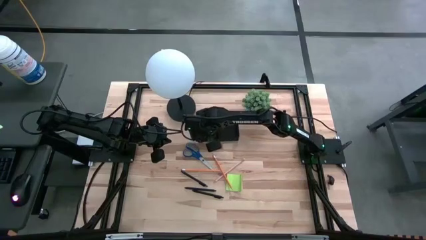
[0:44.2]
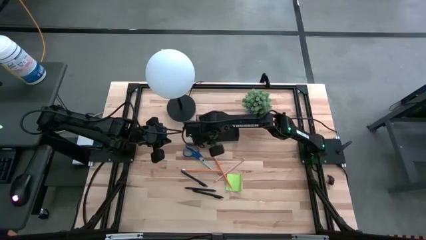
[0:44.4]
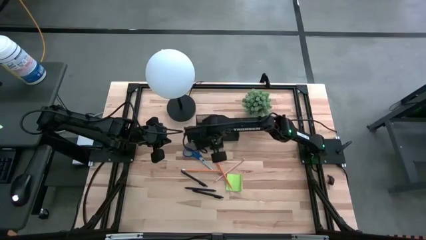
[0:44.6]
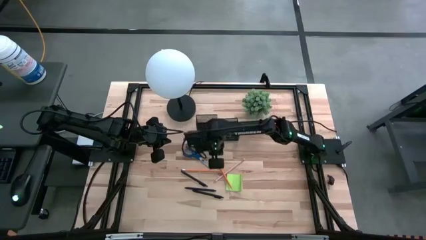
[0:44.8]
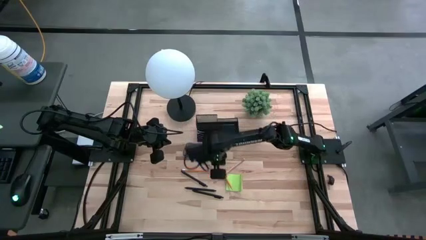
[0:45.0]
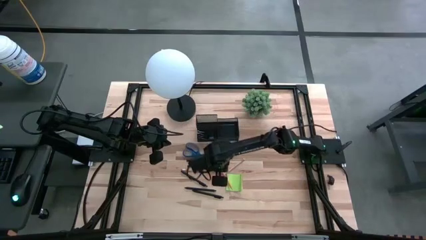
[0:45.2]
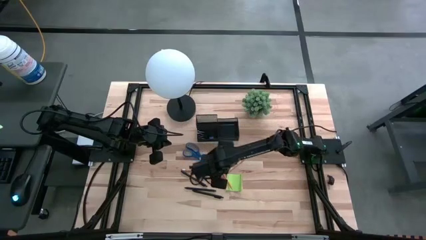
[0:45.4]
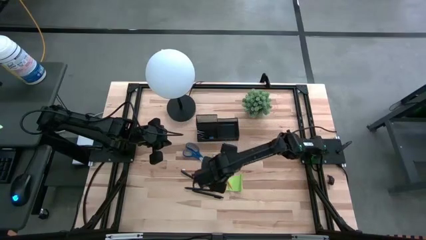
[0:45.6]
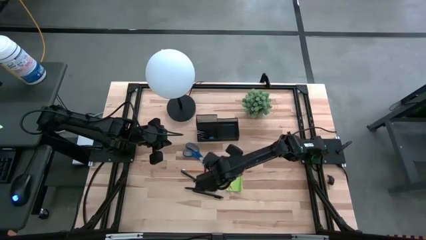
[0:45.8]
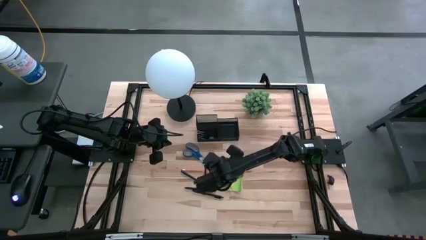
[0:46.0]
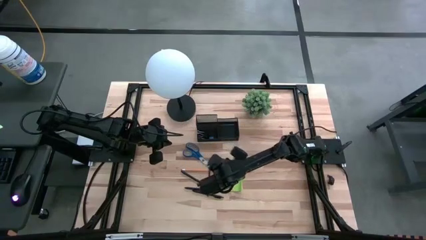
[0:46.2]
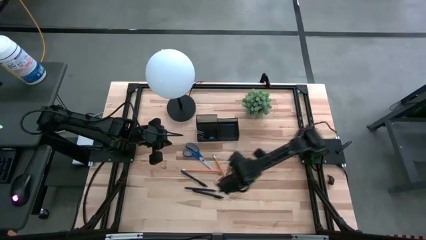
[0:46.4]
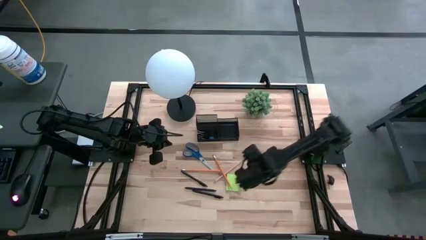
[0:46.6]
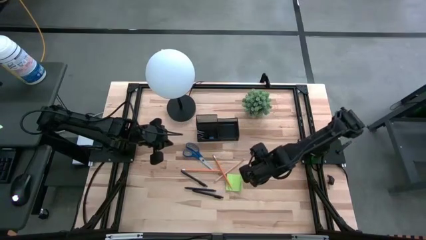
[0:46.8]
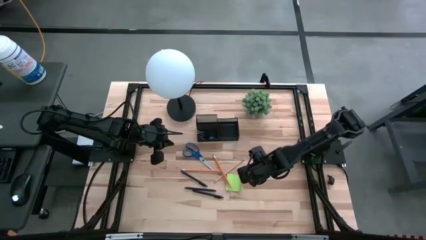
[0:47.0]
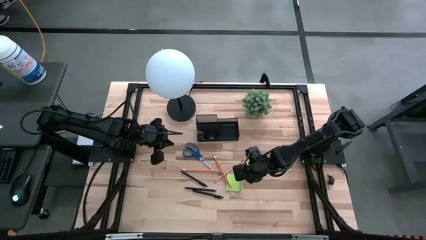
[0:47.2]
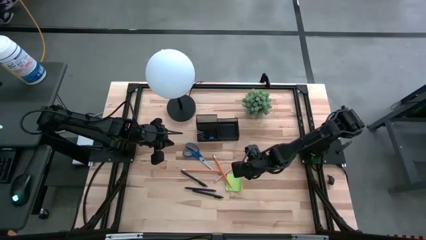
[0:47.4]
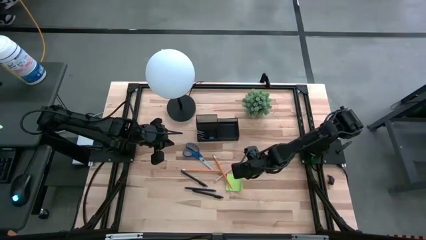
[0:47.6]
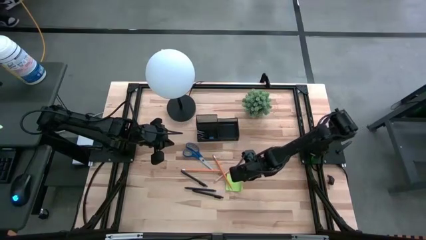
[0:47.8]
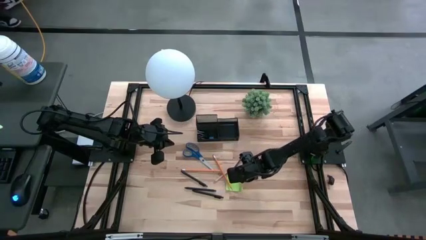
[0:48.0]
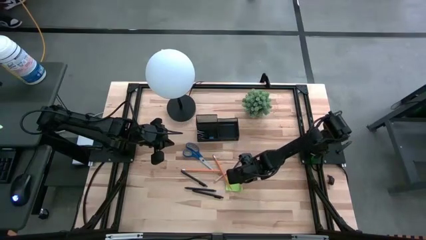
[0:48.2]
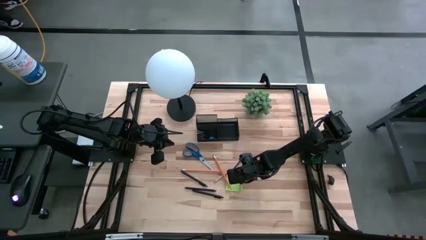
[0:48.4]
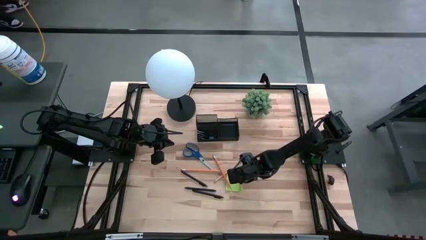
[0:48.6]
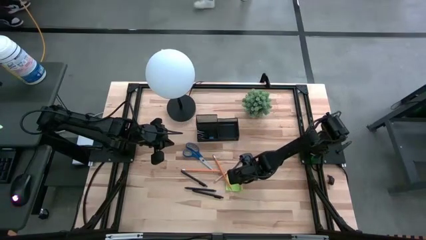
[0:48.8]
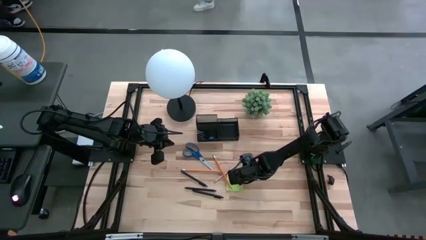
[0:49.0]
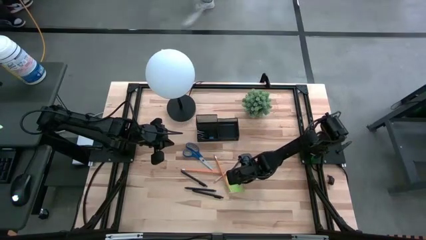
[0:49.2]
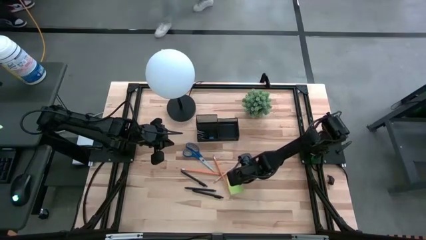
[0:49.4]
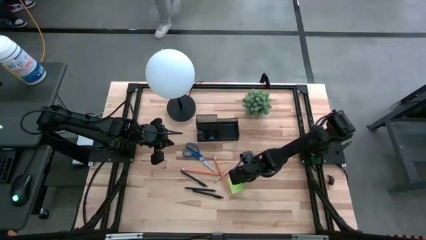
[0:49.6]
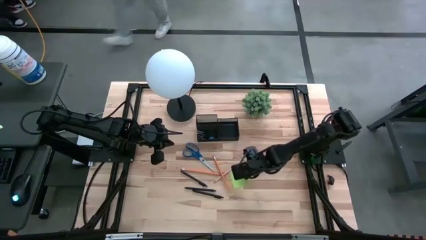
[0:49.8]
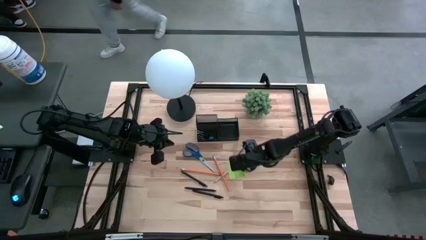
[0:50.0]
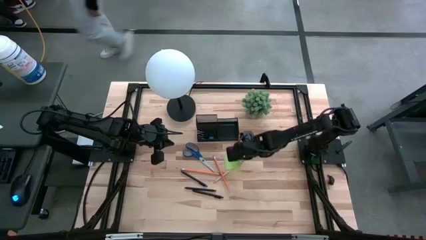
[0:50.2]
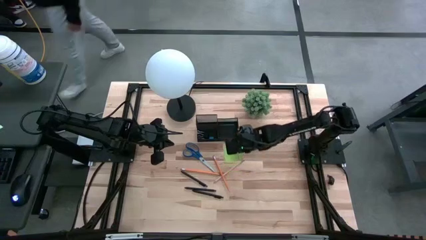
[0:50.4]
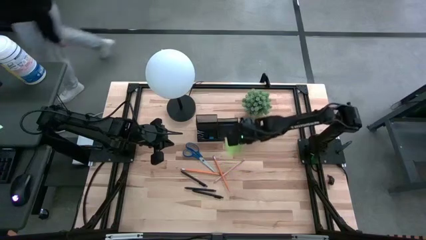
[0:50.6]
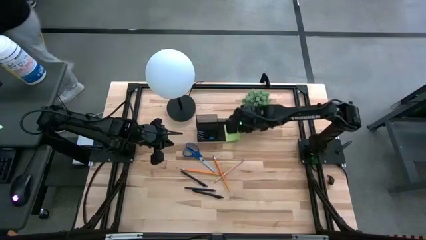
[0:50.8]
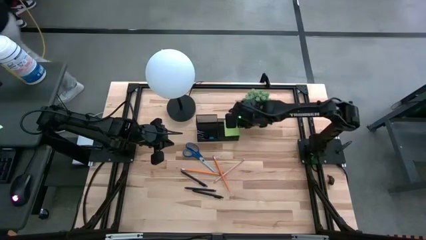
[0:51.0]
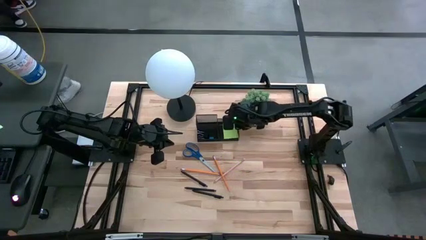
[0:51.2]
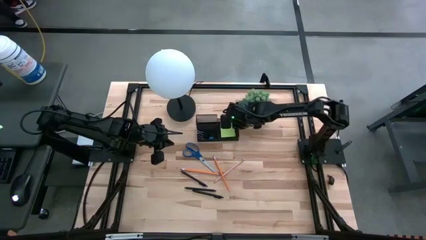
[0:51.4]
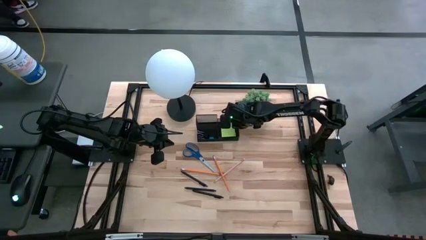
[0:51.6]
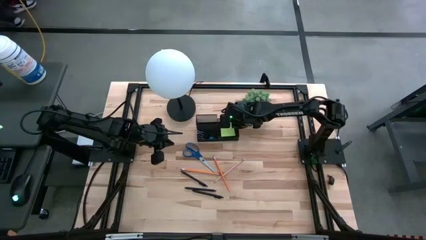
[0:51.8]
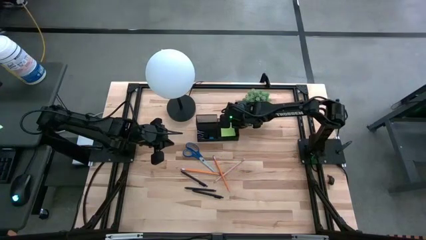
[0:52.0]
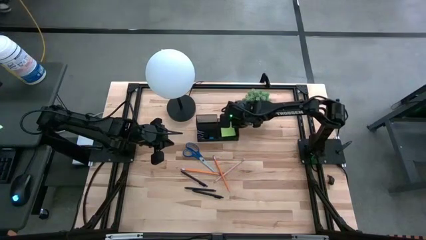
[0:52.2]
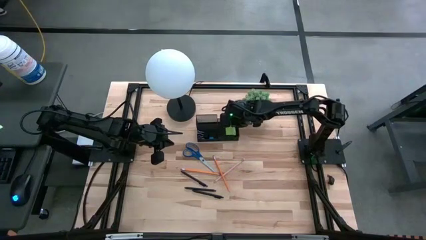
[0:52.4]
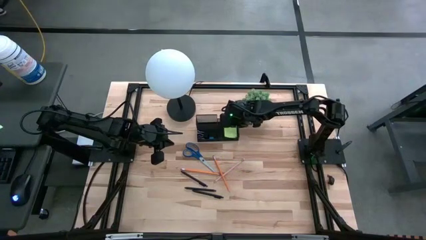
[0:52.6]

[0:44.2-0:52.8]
Task: Pick and place office supplies into organizer
Put the green sticky notes into the desk organizer

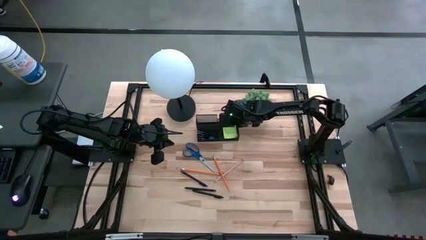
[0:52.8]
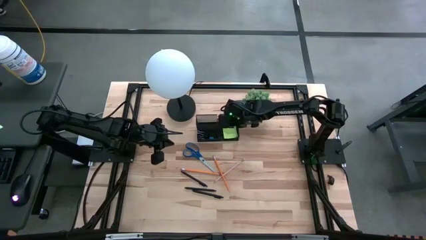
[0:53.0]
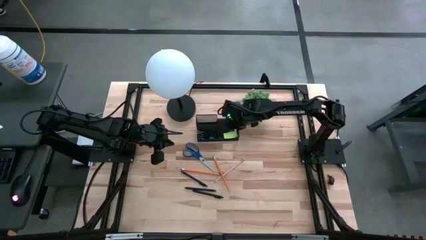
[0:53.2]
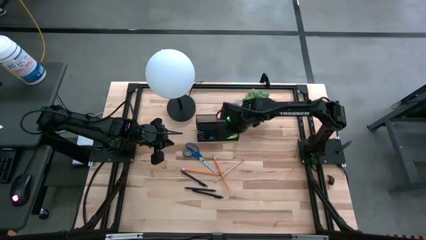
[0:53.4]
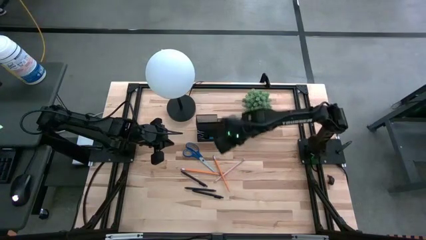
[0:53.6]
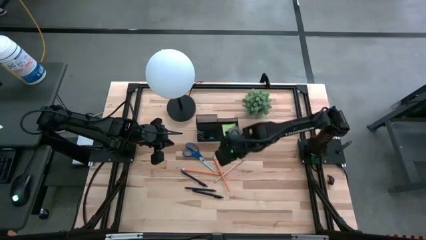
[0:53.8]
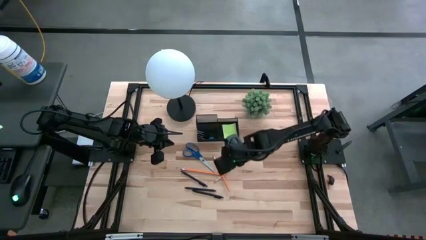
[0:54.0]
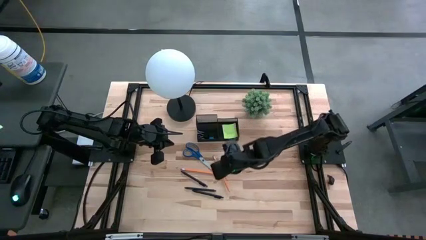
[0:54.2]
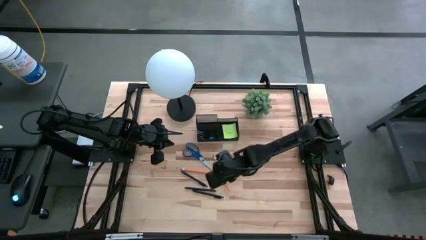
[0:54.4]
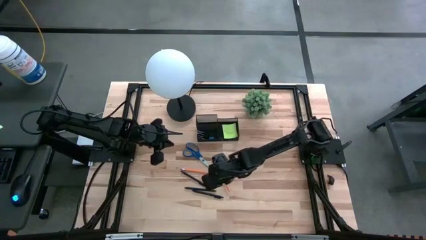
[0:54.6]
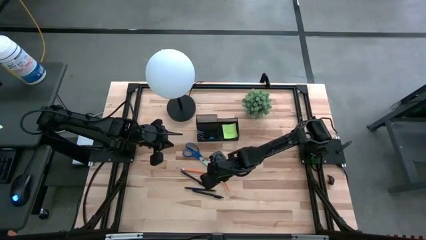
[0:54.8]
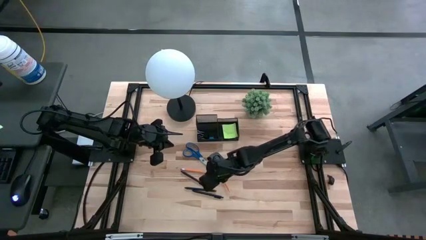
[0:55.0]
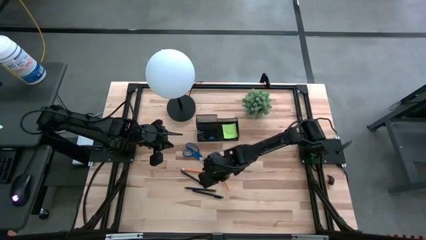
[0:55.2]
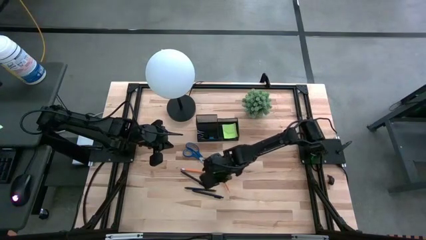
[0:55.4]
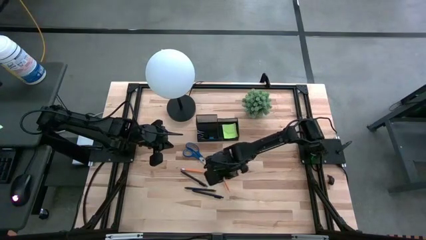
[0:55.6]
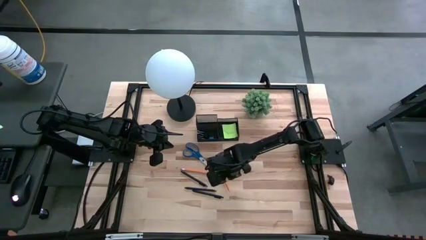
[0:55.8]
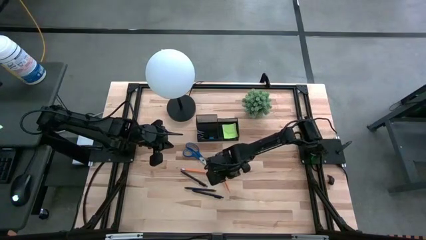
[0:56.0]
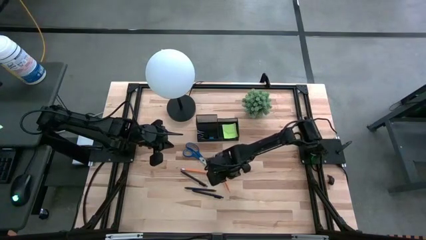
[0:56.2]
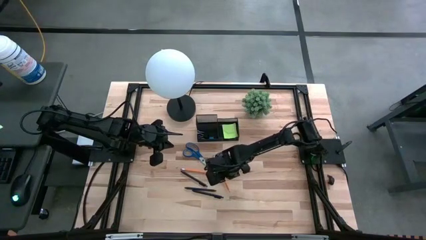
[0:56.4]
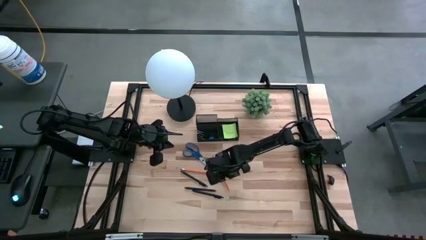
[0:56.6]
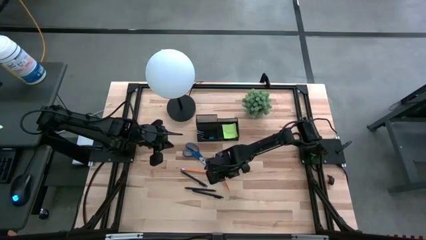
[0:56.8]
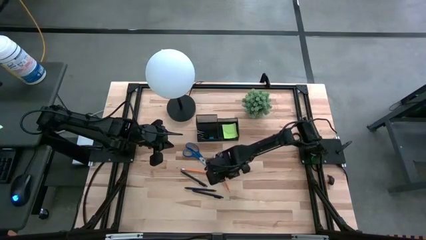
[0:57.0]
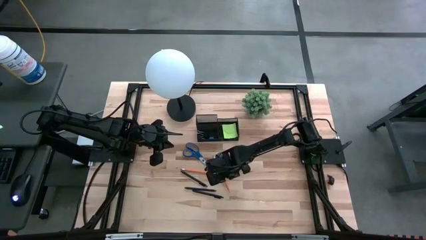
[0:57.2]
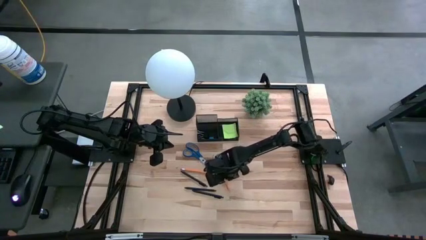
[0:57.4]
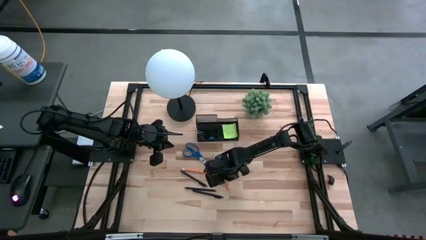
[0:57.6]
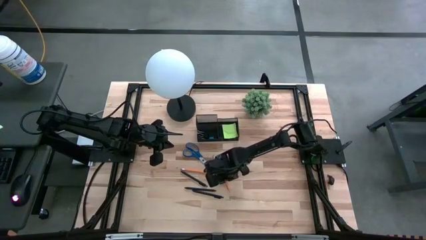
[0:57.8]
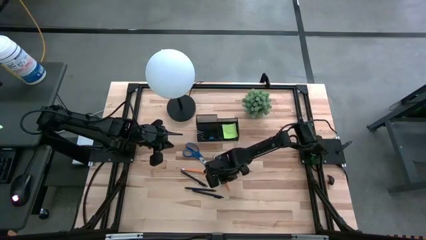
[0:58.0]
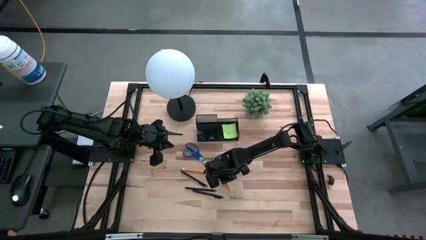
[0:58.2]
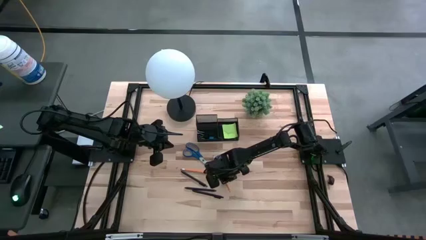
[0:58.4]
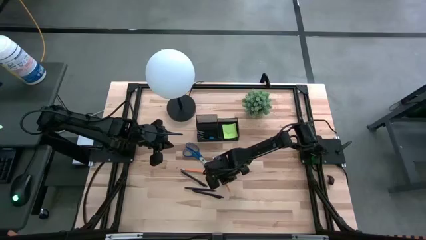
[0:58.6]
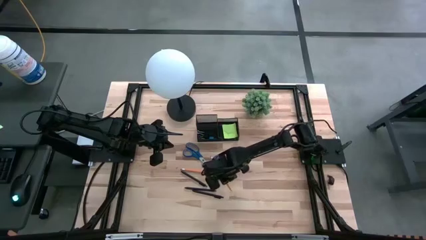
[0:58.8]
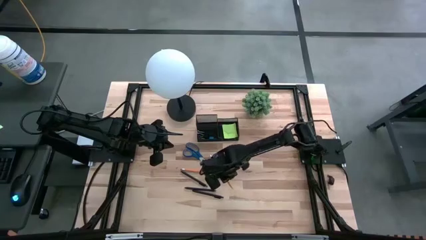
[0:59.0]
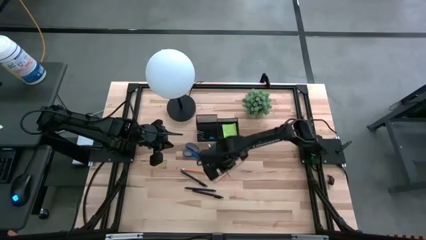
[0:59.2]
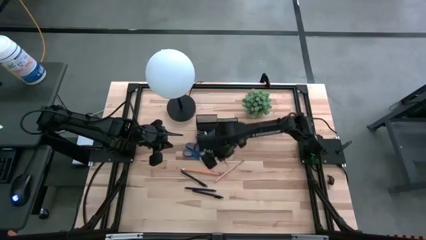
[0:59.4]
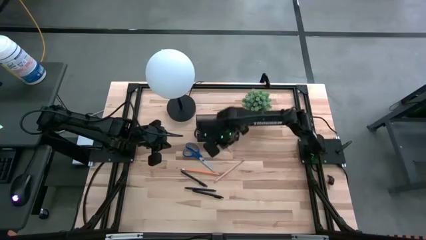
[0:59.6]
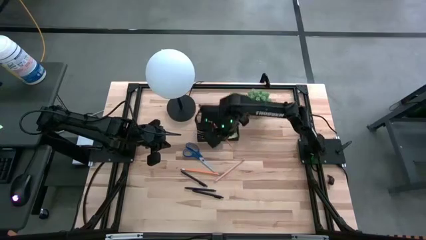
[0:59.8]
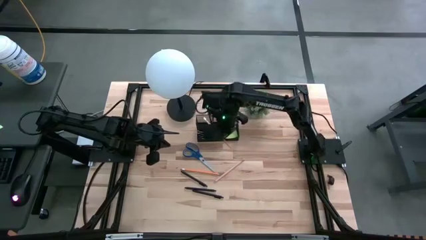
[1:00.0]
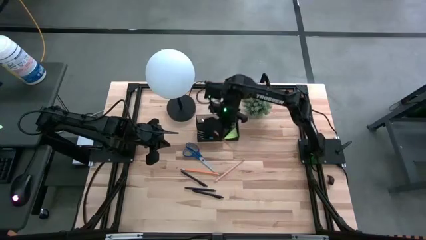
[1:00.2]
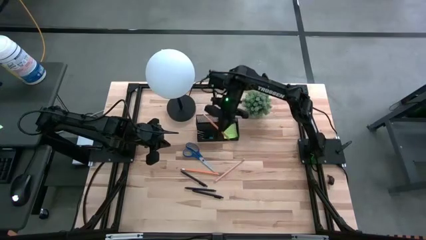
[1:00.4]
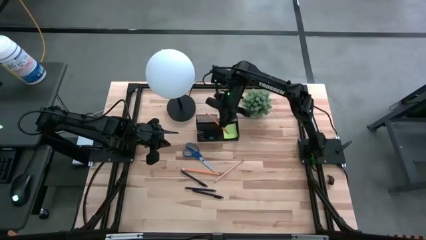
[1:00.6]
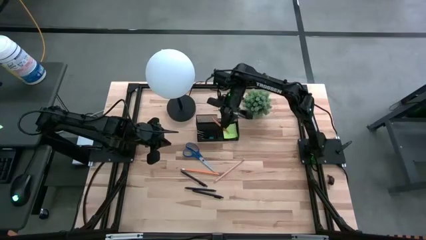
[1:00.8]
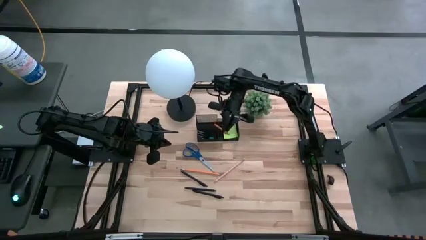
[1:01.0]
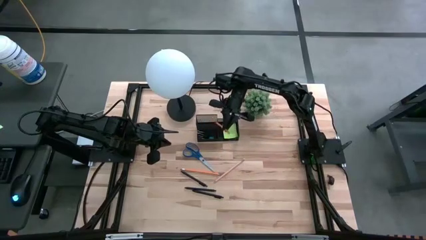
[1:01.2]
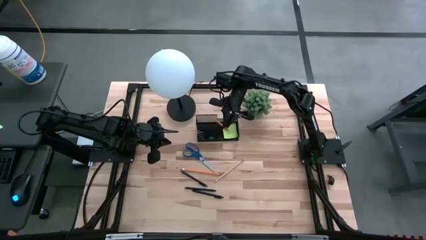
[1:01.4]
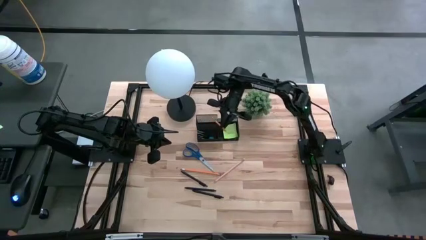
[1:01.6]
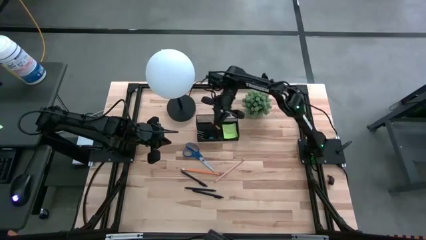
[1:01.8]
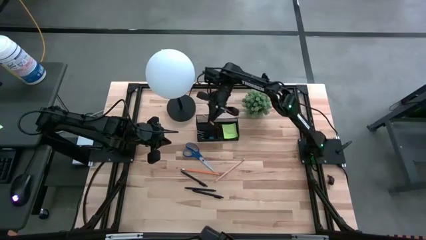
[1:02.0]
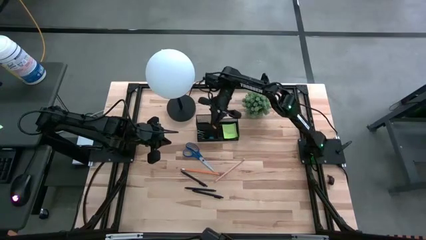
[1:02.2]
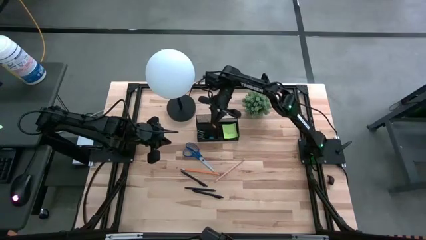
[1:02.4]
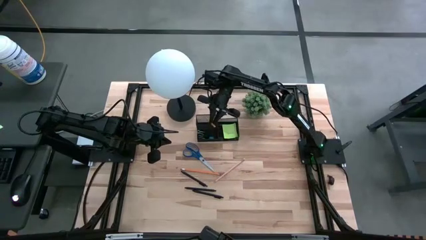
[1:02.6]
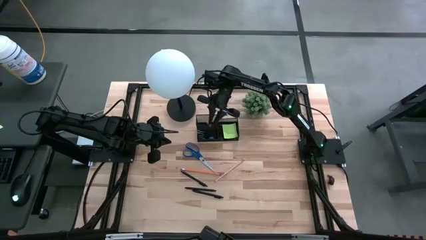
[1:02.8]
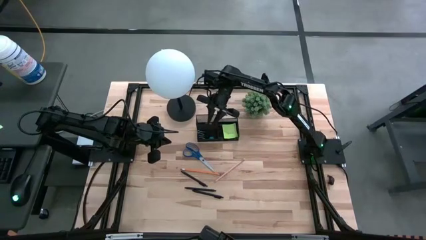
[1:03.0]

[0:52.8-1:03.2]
Put the right orange pencil into the desk organizer
